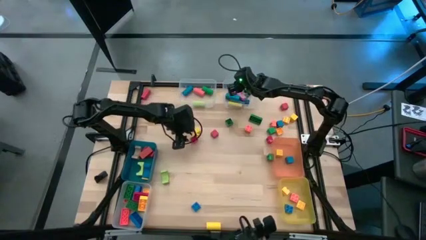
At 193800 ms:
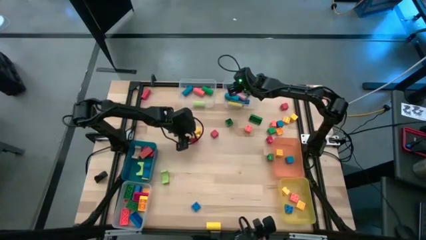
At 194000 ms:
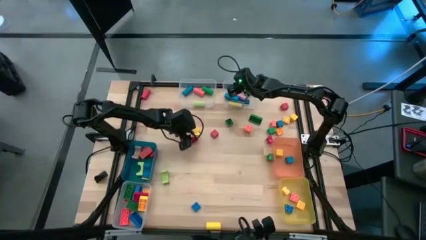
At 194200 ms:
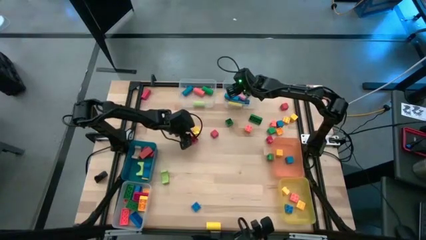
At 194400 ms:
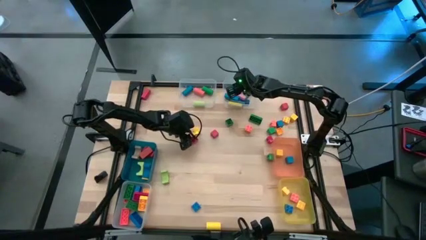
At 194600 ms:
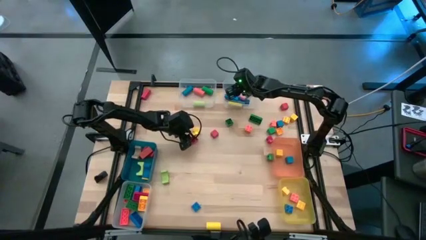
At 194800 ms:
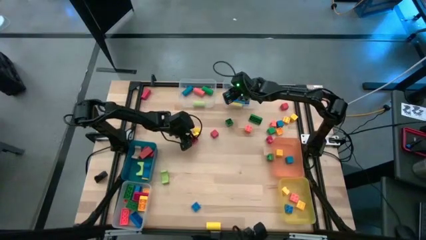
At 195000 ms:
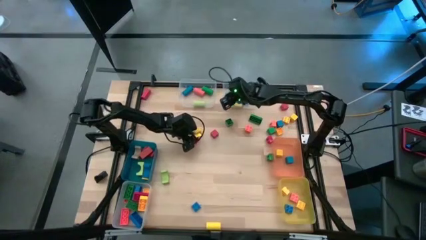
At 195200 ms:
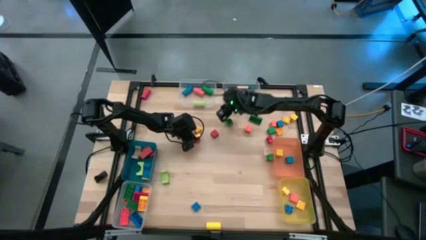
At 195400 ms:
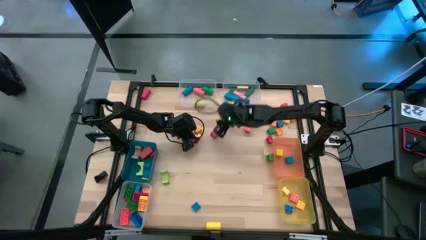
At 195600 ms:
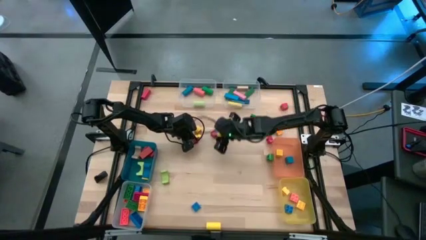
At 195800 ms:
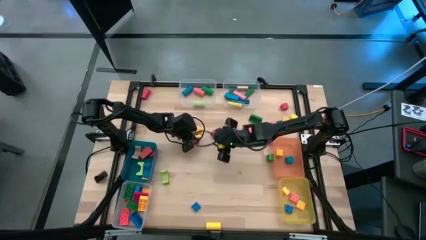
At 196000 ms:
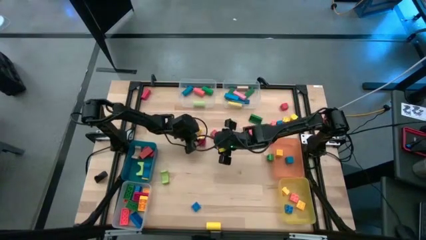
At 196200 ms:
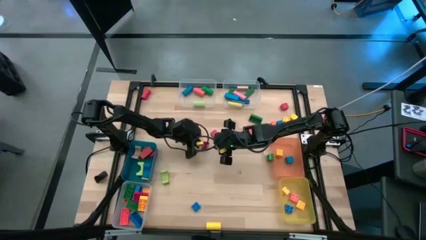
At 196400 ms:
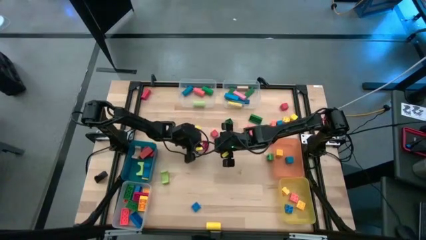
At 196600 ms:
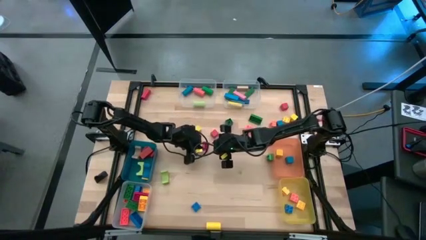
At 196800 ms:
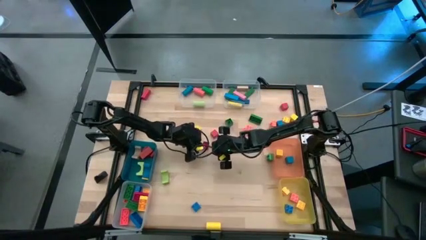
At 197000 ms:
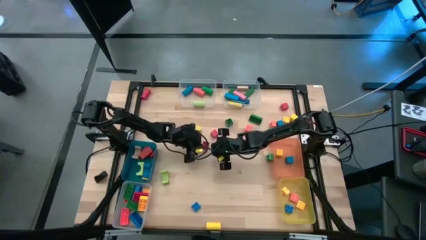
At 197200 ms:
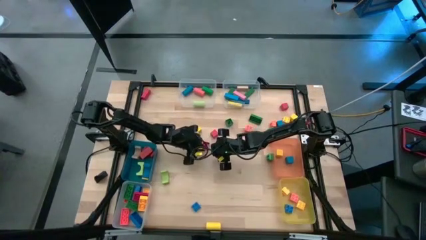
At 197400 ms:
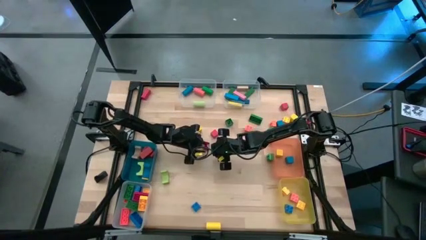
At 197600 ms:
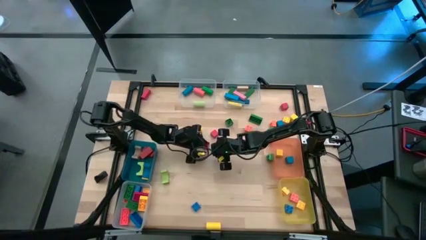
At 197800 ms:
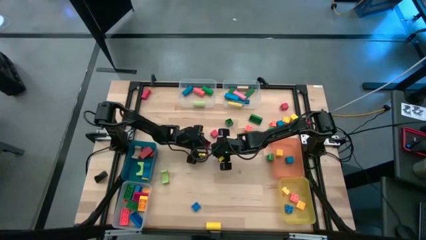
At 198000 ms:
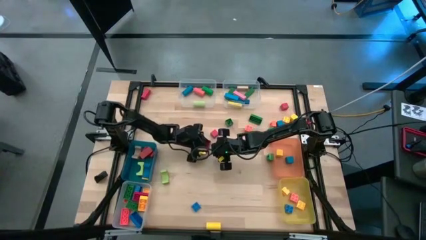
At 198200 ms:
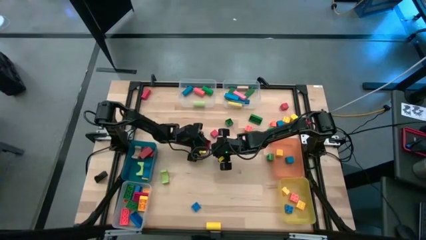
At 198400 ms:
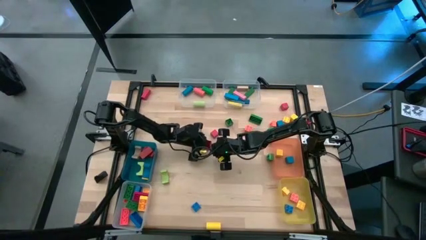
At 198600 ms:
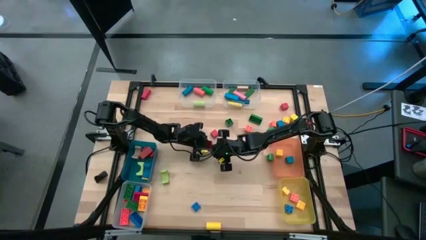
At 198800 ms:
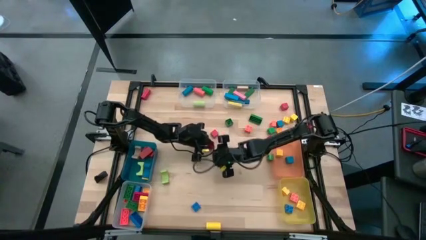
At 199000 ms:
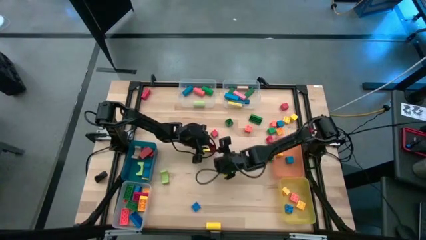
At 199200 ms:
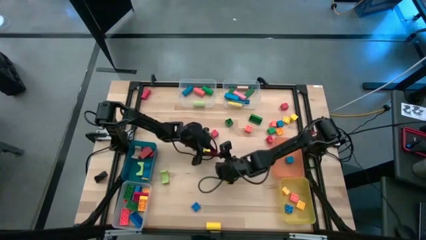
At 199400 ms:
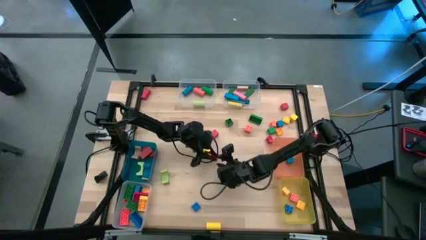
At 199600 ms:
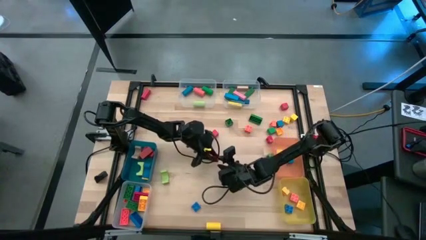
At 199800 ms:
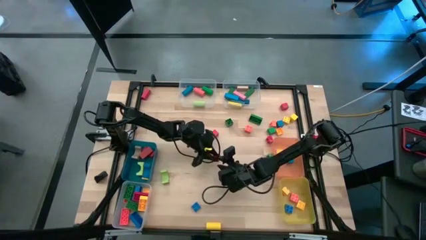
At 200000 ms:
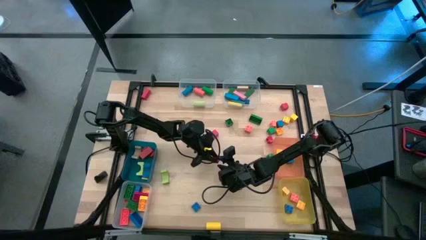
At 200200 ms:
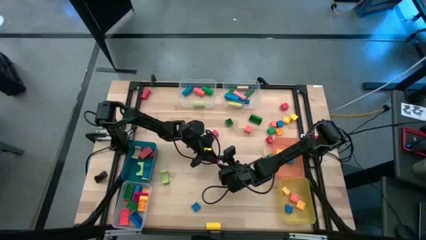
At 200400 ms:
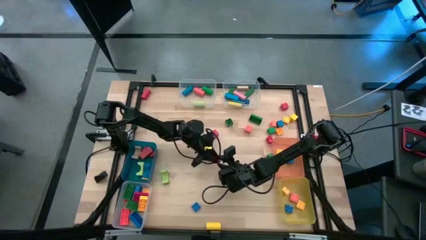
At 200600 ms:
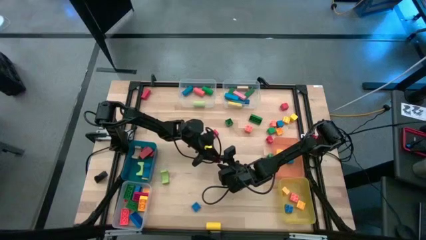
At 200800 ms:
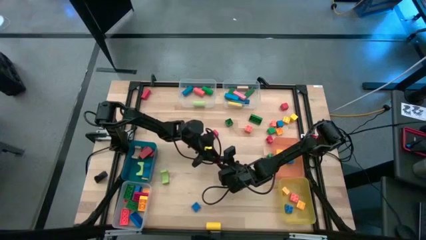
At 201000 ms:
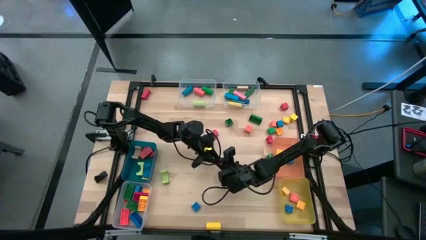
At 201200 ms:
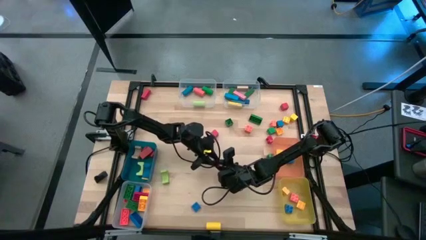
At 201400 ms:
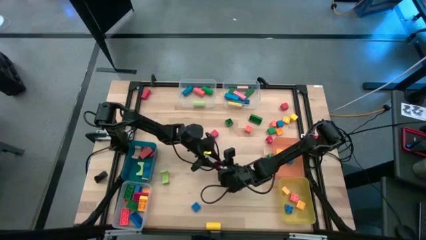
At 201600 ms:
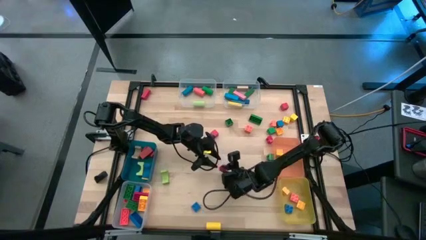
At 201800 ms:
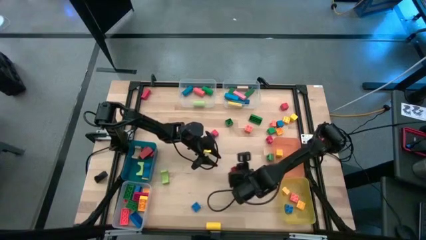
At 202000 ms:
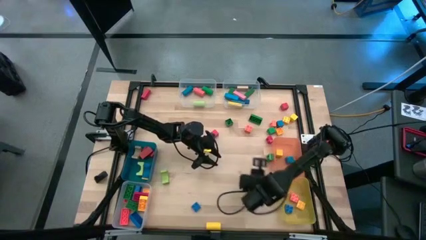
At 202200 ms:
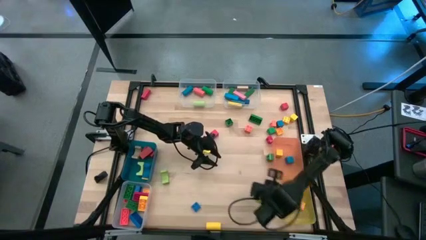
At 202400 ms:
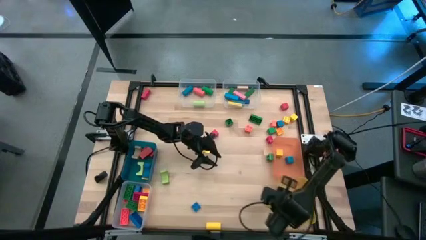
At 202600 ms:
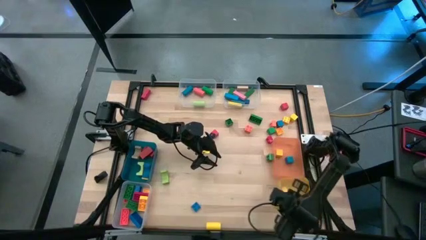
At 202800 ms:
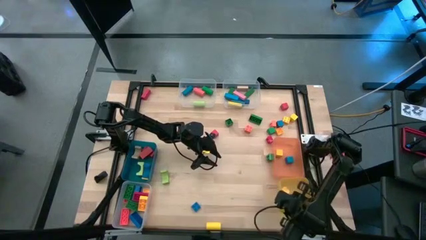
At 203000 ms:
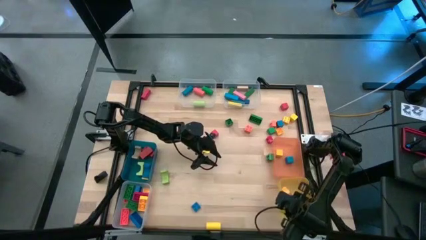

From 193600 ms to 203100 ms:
Task: Sort blocks by size
Put the red game piece into the yellow bin

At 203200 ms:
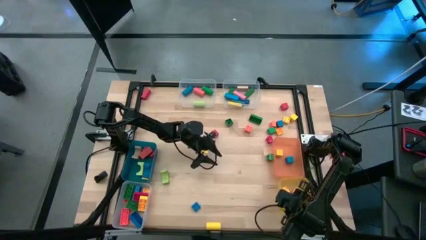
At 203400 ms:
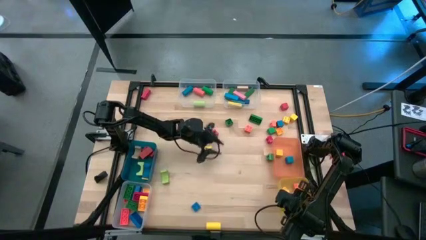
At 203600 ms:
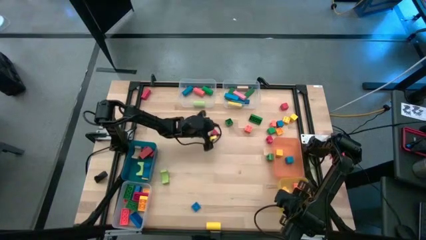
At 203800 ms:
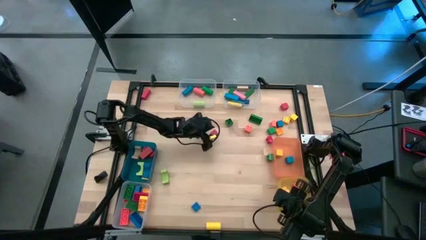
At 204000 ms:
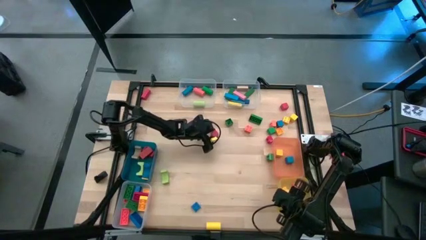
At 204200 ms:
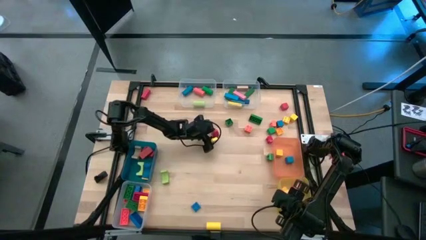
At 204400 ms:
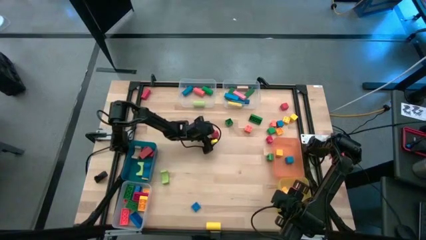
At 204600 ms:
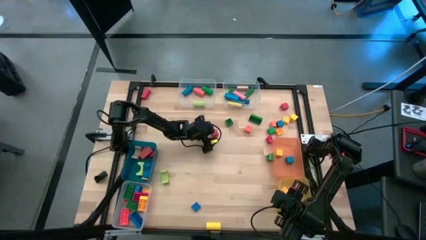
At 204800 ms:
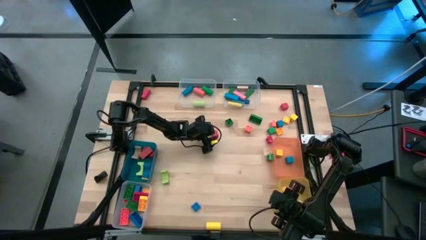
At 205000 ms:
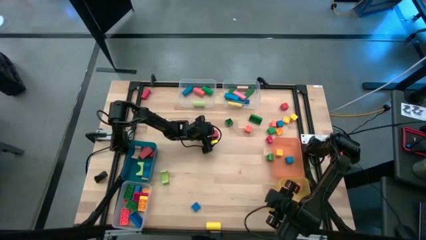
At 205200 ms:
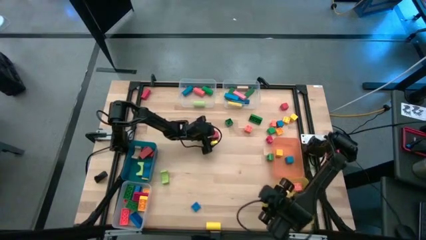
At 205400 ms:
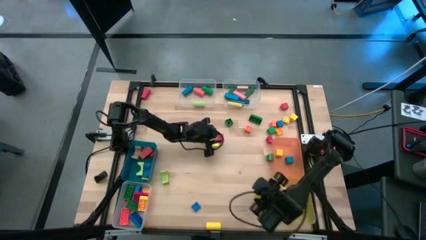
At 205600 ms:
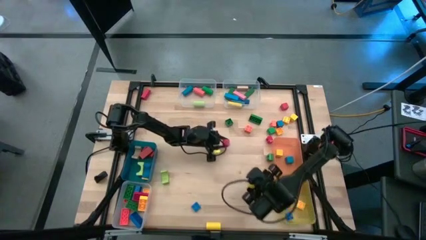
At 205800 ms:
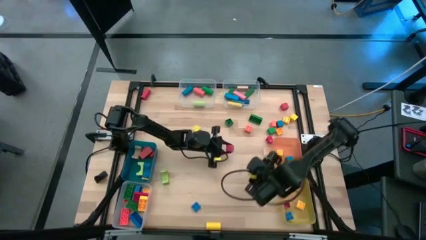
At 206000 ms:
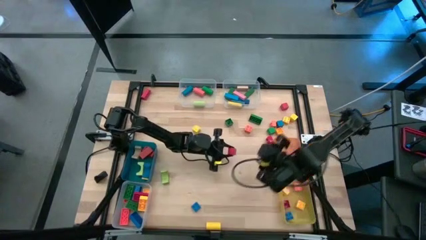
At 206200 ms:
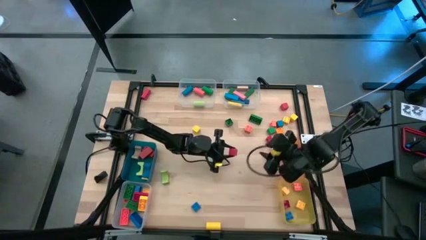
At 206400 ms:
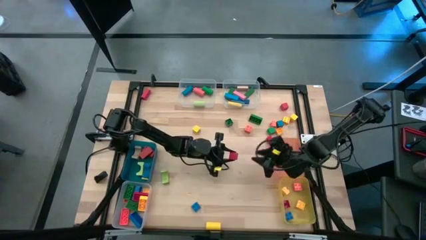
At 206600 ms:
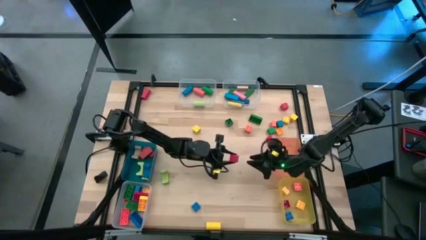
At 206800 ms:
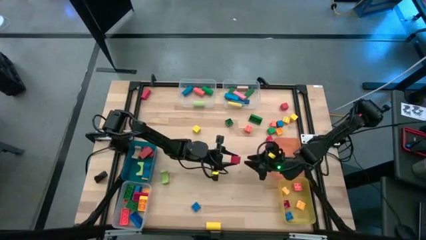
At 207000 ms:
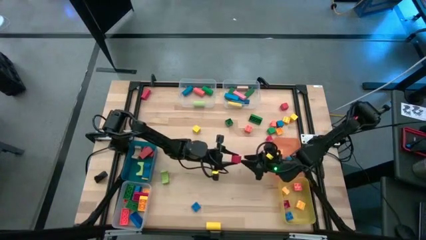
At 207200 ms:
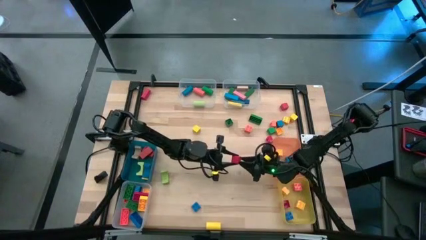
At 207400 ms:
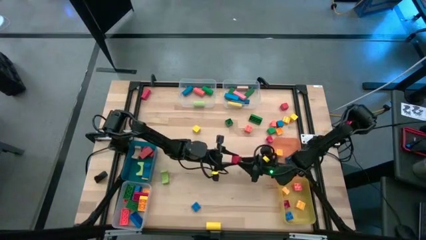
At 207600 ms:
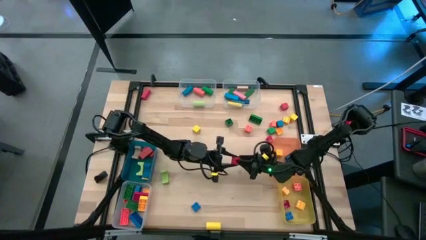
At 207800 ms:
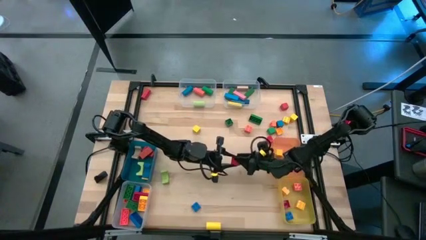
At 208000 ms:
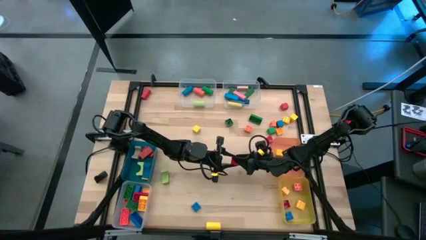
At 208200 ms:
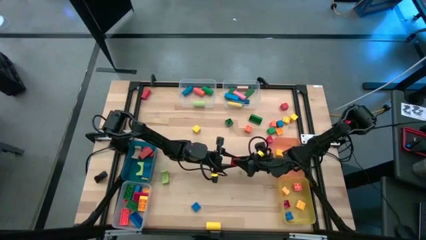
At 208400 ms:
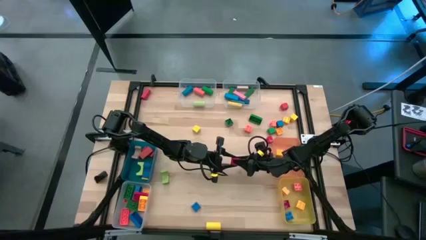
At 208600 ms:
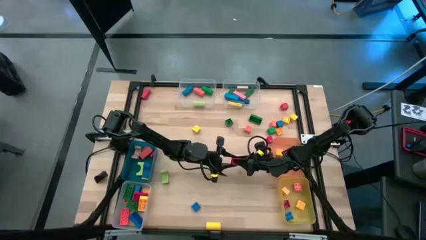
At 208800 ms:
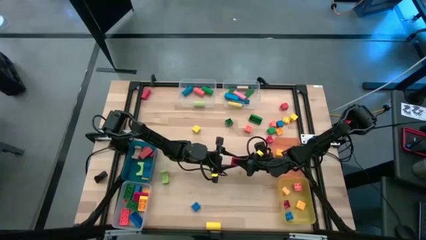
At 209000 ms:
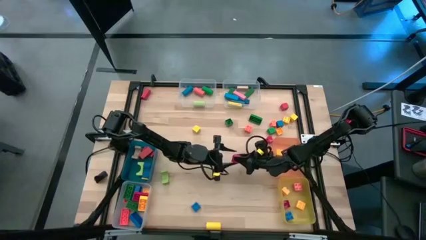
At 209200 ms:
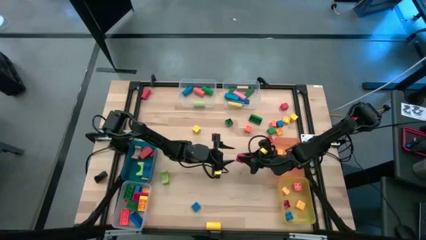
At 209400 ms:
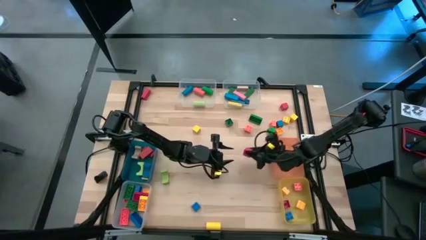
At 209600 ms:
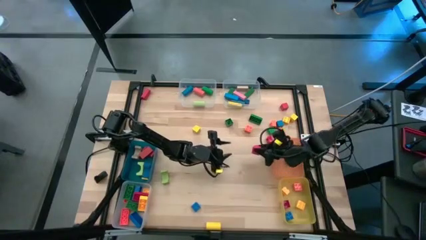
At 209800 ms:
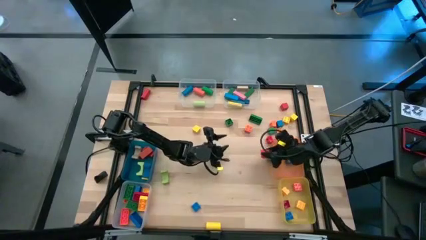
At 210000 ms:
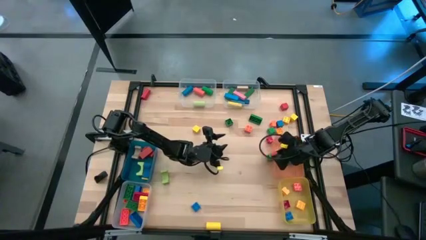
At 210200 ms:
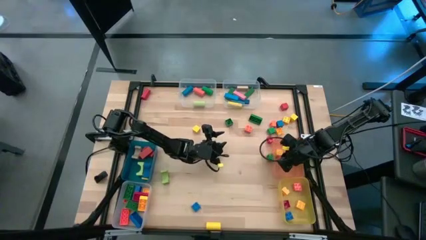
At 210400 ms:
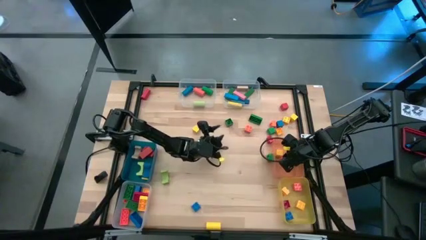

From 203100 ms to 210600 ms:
Put the red block into the orange bin
